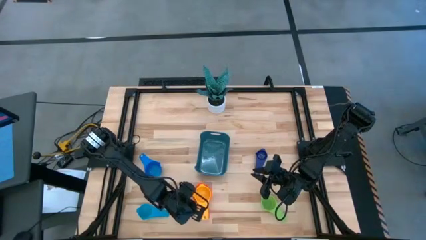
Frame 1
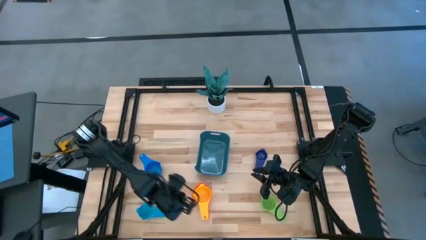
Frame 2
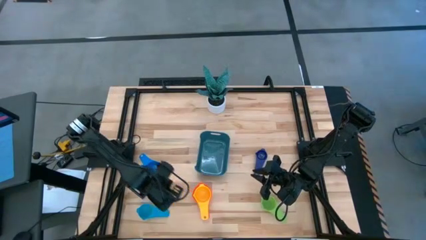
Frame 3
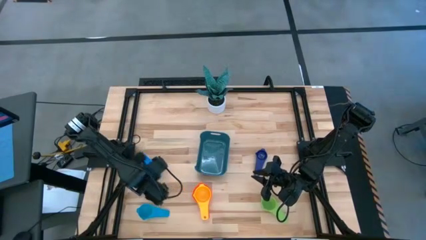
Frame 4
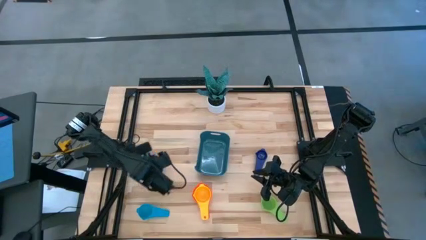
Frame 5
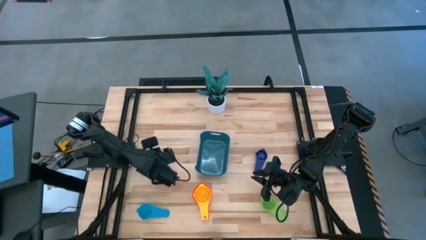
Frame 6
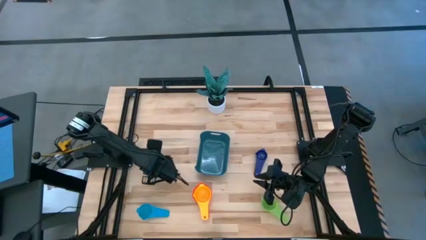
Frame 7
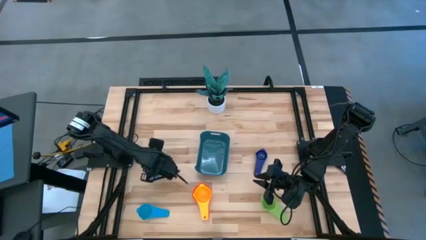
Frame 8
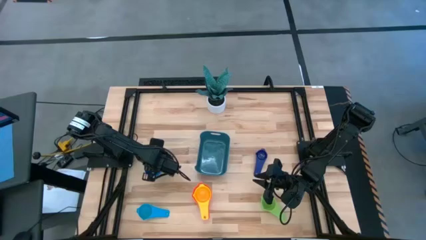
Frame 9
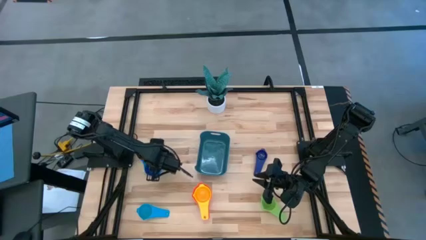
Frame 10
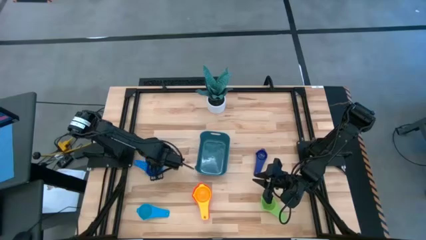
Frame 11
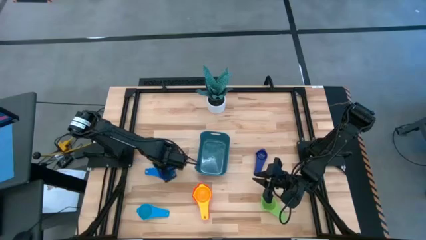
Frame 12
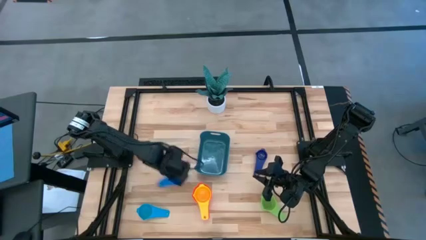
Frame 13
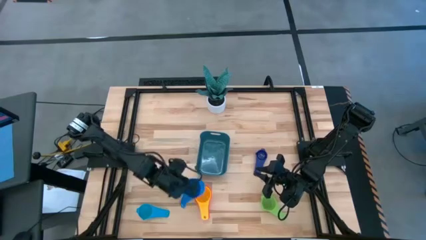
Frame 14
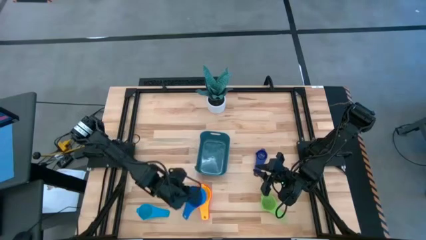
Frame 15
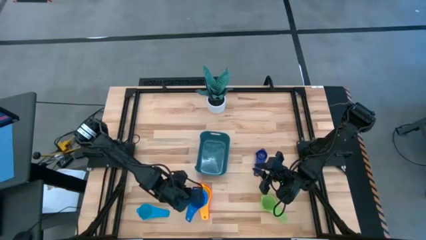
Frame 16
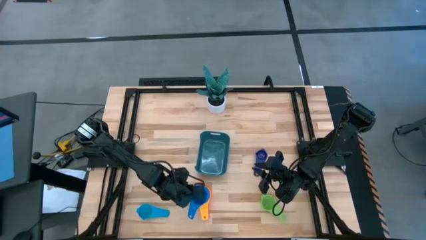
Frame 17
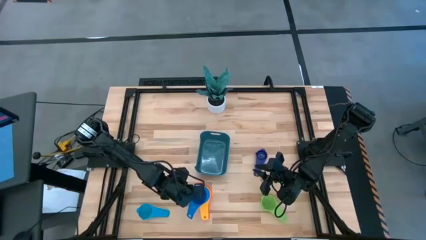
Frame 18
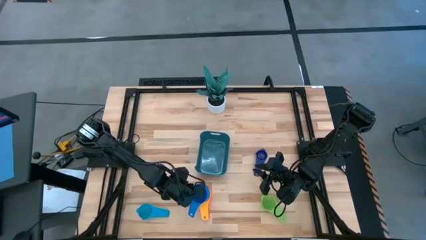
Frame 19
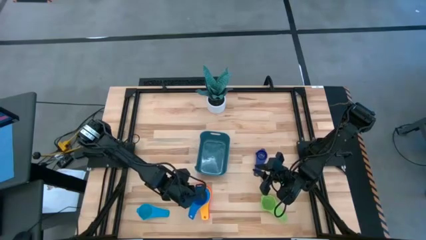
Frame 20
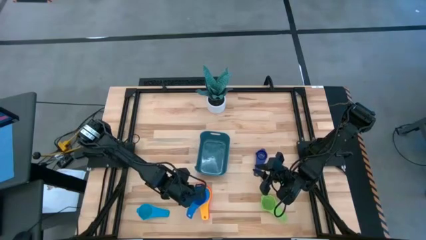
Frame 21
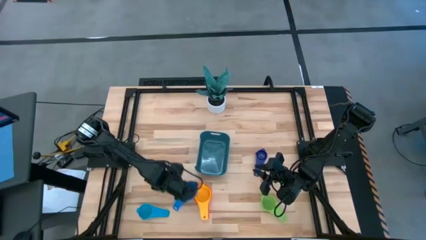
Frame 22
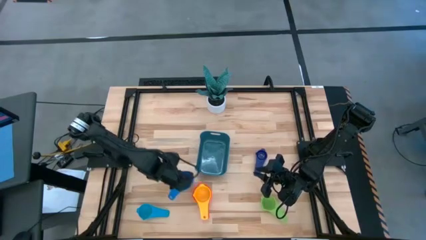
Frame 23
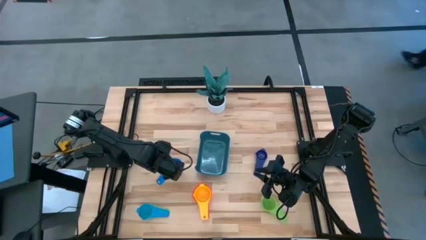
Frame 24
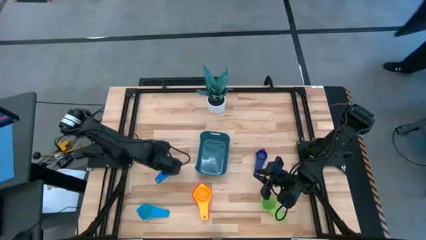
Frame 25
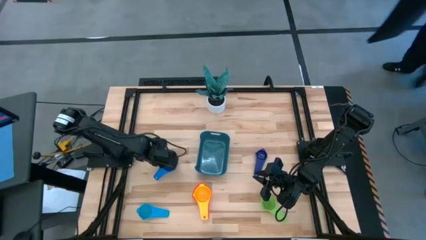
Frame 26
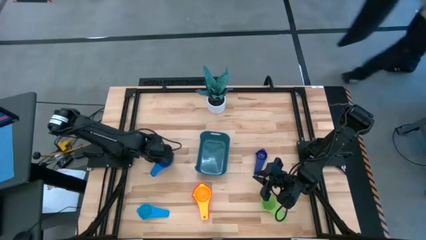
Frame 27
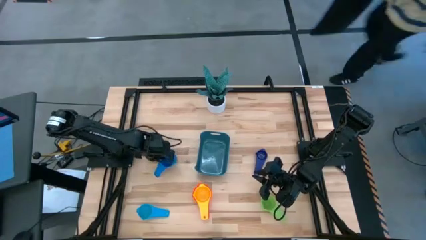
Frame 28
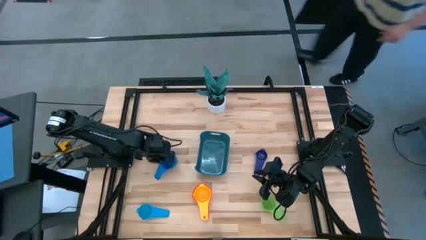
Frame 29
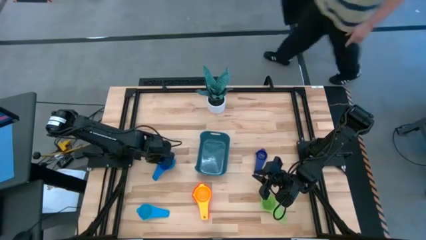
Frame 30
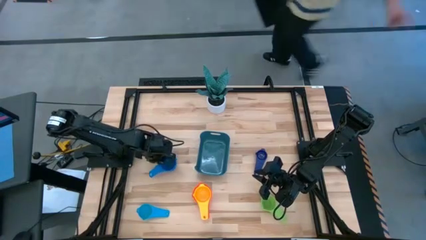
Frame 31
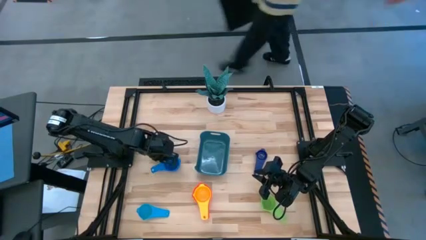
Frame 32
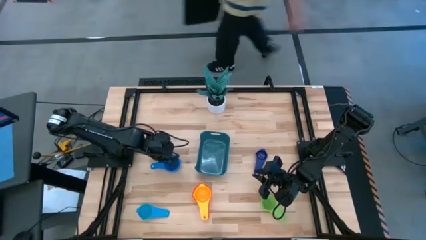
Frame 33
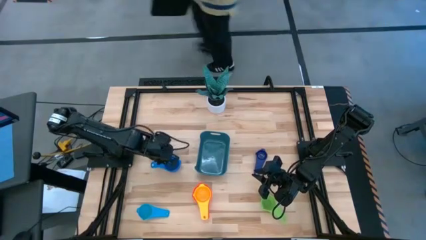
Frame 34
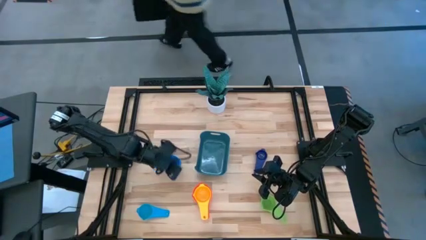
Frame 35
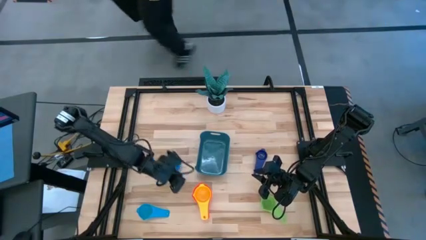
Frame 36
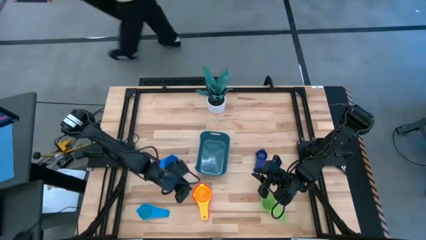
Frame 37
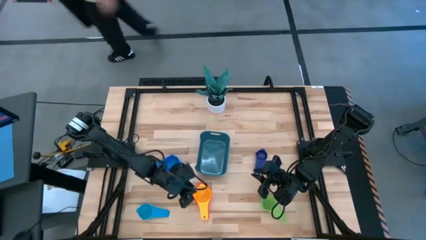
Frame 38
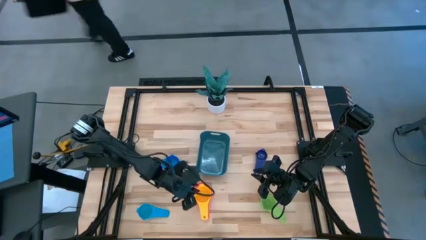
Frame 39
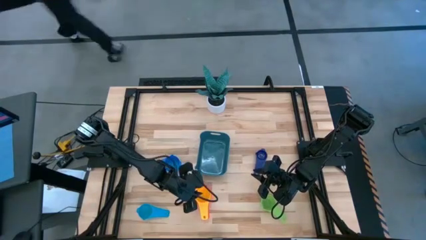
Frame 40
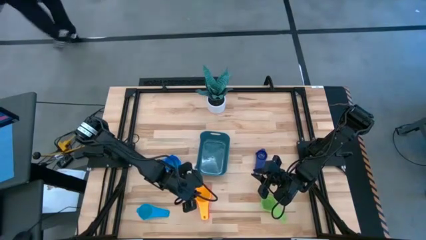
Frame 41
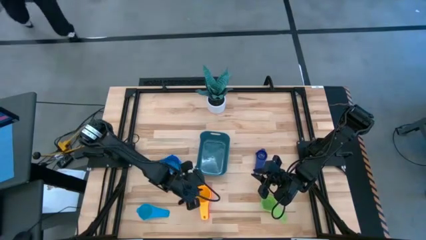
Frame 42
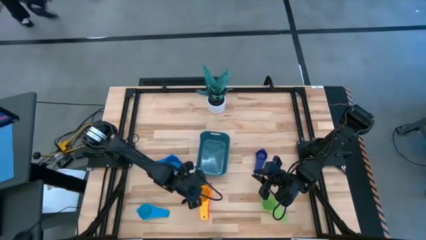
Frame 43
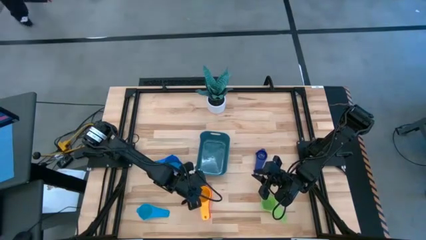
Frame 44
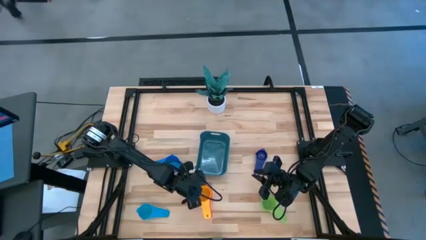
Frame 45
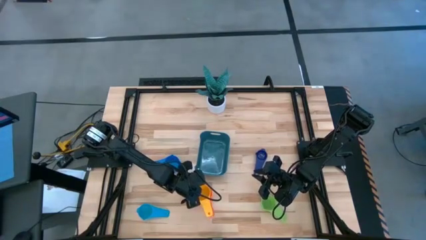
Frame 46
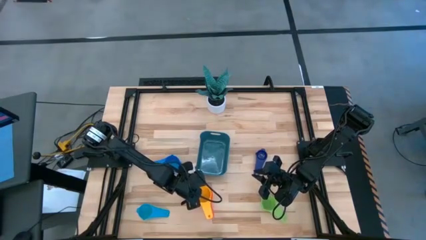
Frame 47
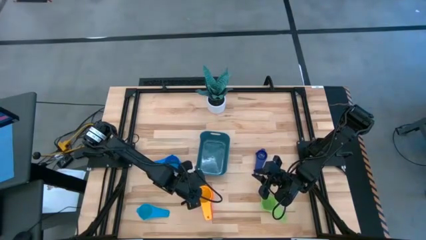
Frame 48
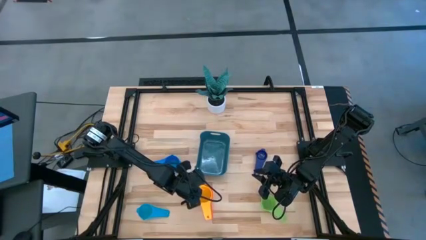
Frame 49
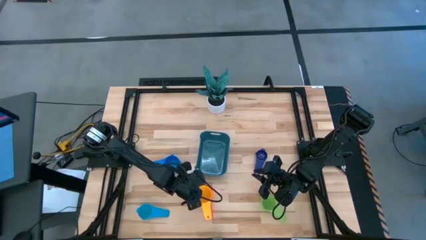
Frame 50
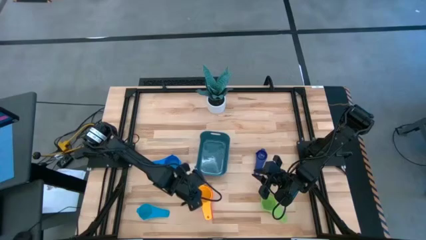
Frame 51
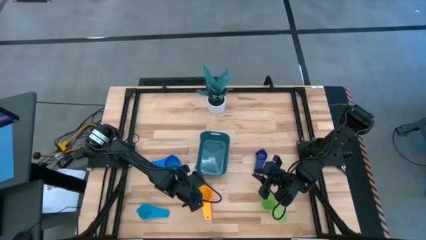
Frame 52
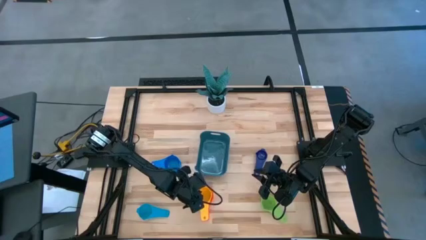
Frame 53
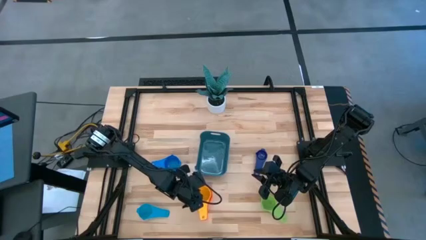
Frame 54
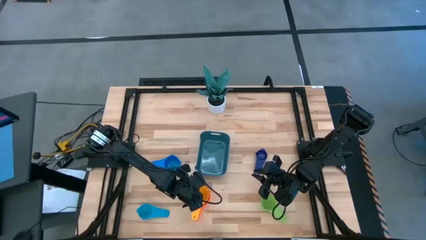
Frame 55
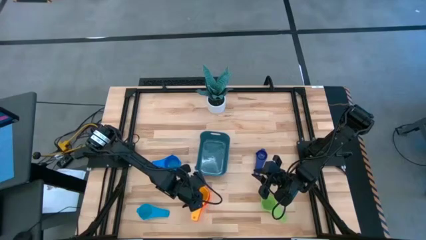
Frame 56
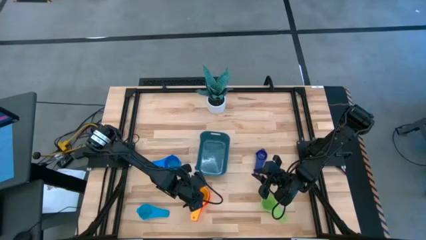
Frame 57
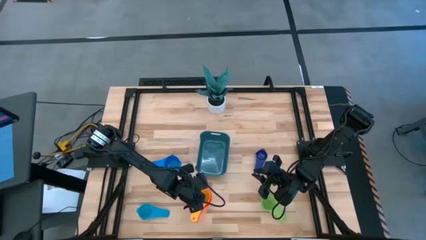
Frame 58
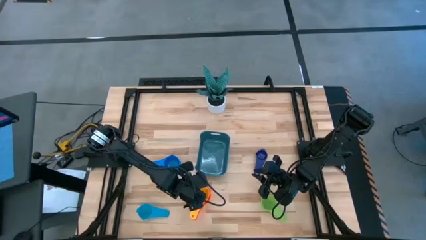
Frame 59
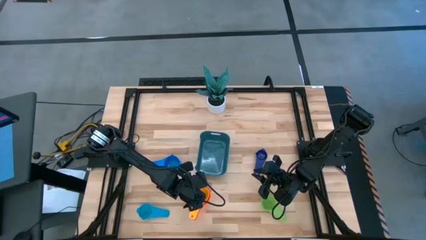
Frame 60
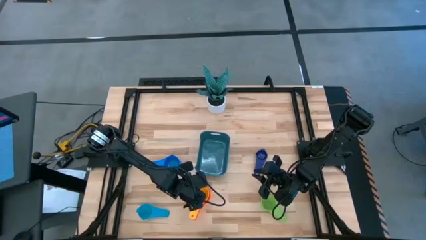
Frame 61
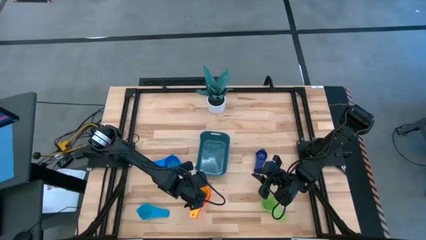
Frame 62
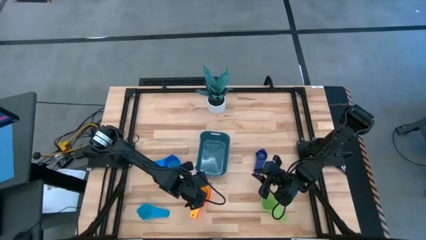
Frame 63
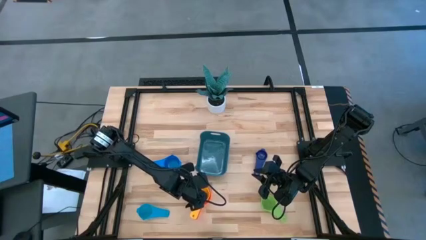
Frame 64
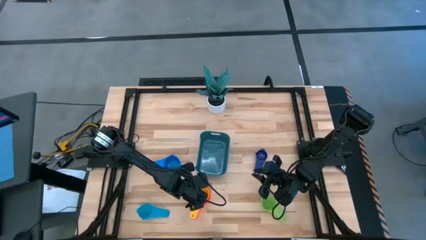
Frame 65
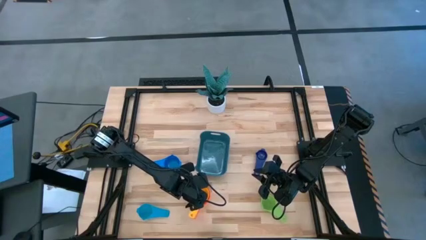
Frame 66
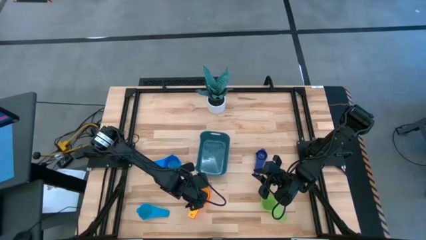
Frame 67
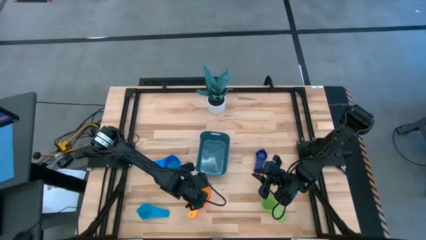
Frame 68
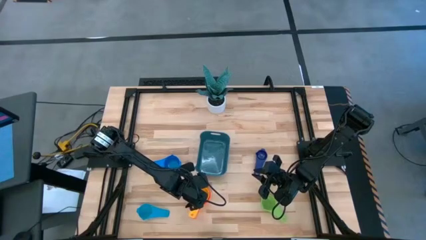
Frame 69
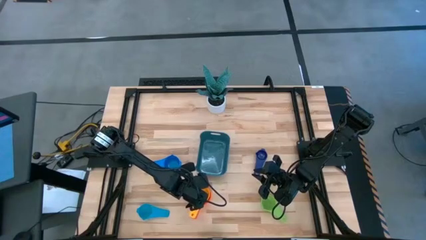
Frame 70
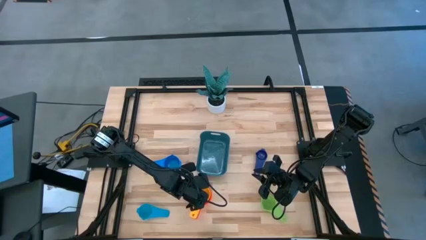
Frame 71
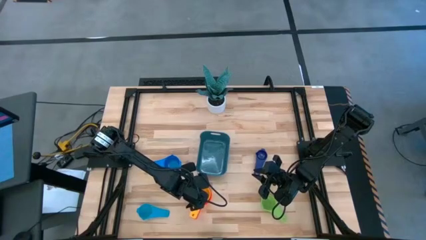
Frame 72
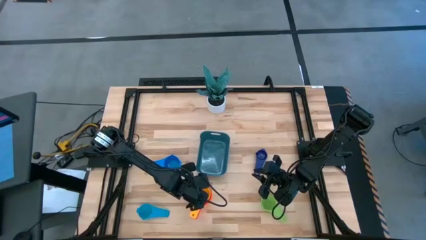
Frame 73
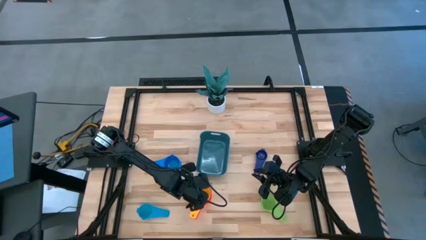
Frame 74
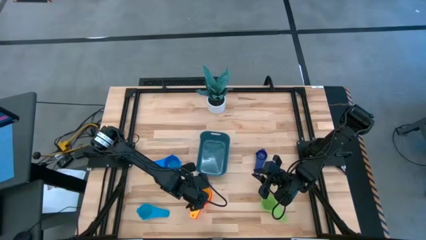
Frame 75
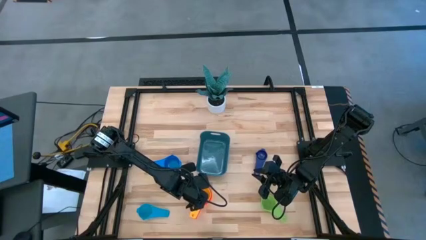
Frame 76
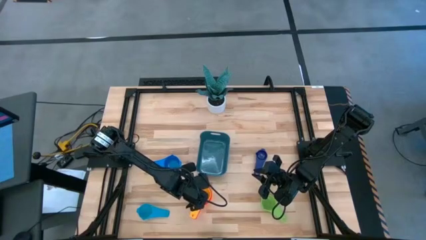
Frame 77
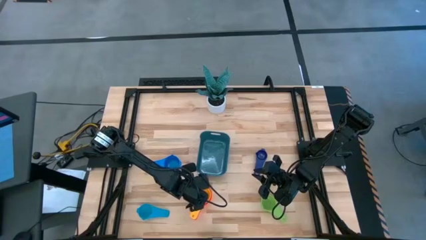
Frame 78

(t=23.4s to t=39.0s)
Task: Nest measuring cups in basket
Remove the yellow measuring cup from the stacked measuring cup
